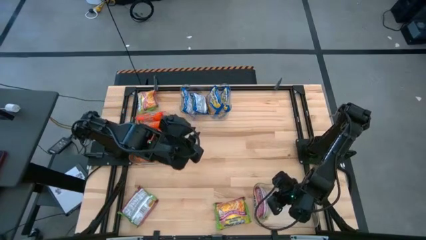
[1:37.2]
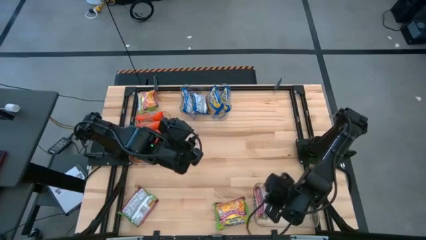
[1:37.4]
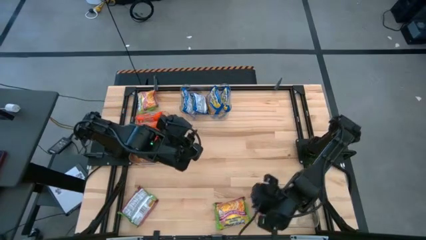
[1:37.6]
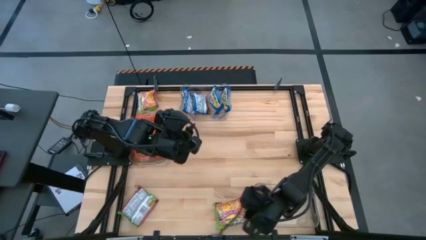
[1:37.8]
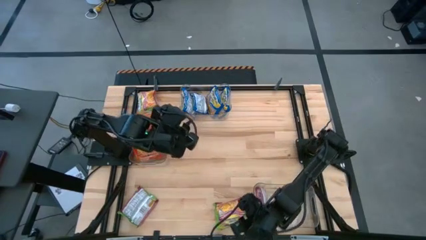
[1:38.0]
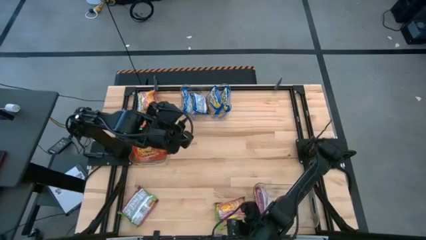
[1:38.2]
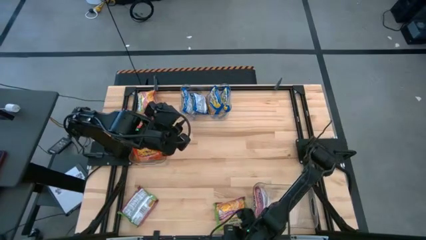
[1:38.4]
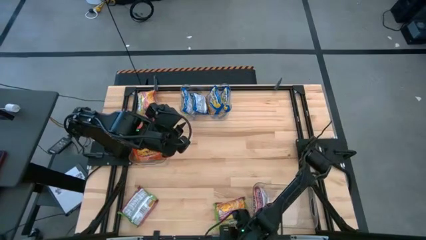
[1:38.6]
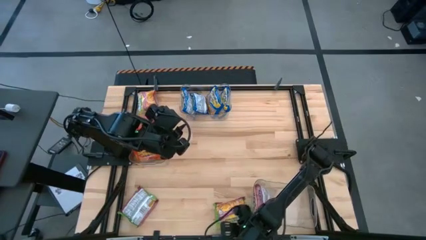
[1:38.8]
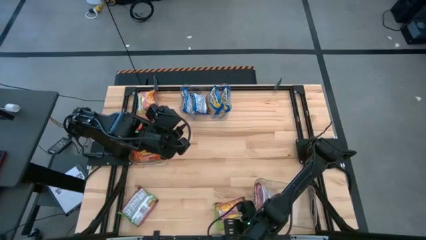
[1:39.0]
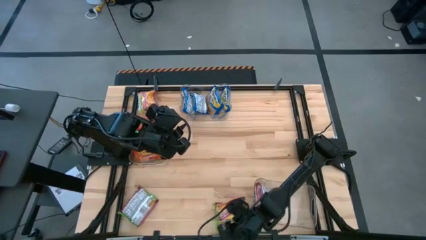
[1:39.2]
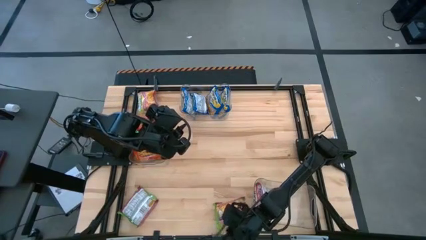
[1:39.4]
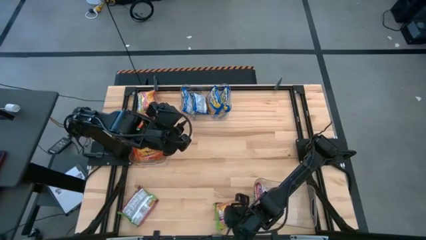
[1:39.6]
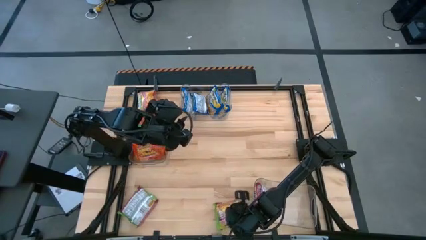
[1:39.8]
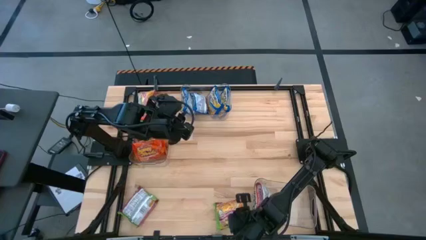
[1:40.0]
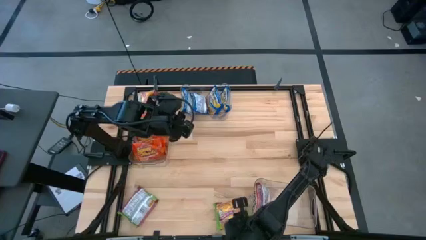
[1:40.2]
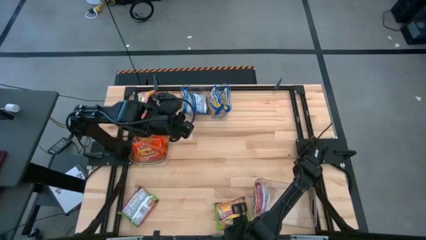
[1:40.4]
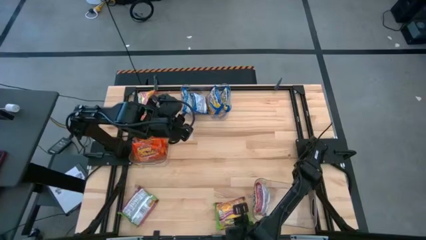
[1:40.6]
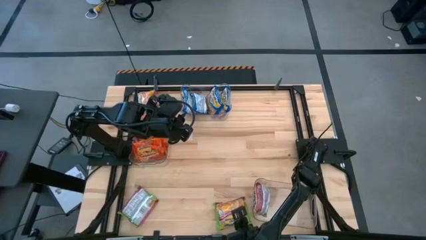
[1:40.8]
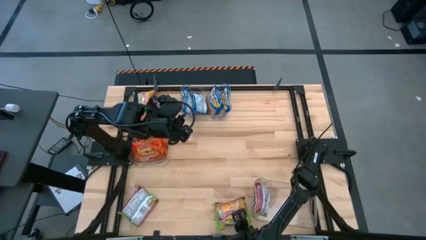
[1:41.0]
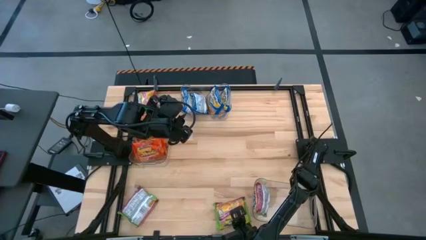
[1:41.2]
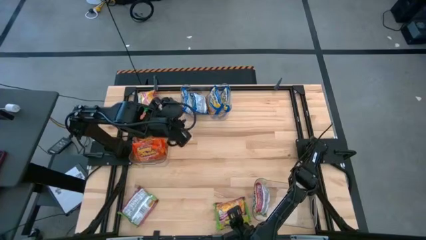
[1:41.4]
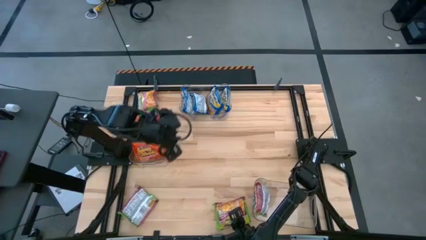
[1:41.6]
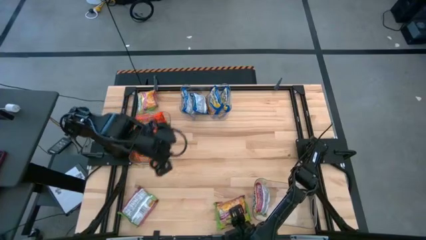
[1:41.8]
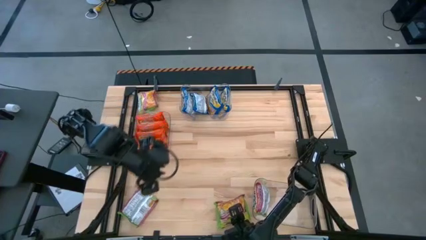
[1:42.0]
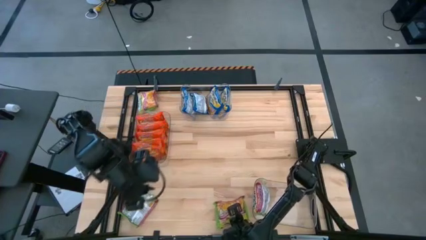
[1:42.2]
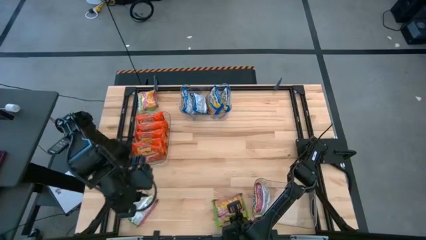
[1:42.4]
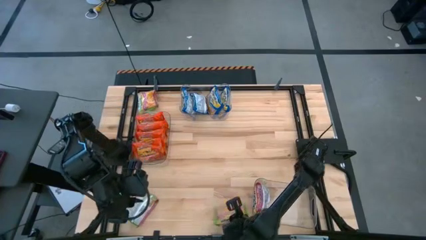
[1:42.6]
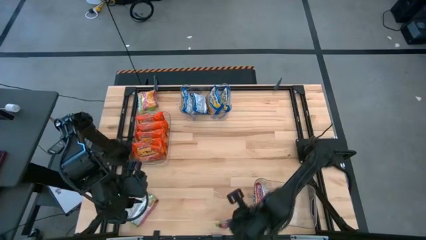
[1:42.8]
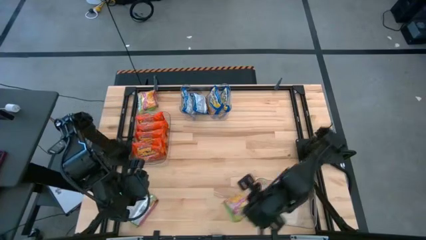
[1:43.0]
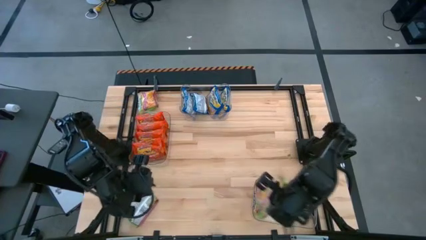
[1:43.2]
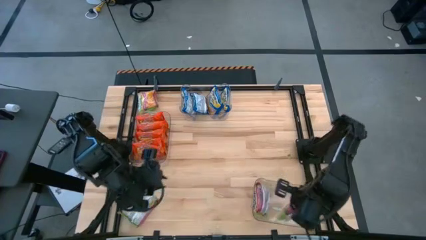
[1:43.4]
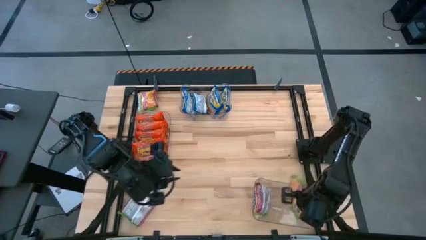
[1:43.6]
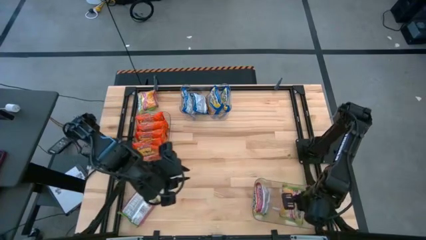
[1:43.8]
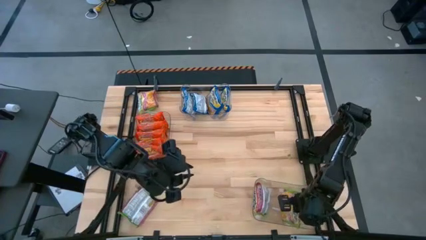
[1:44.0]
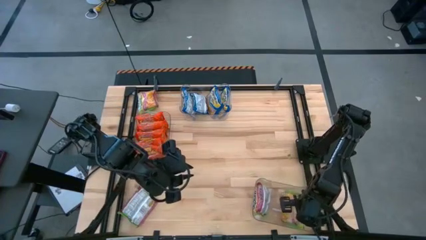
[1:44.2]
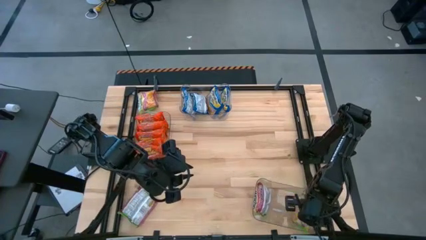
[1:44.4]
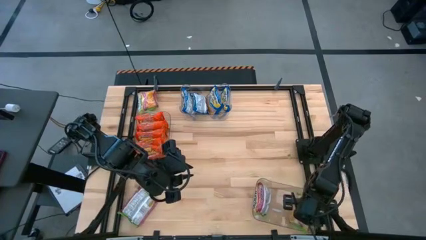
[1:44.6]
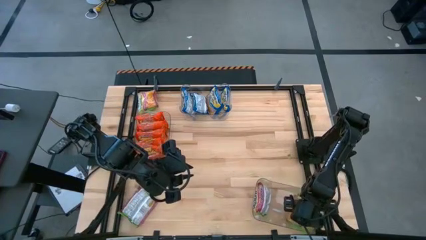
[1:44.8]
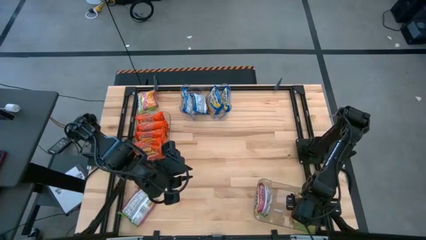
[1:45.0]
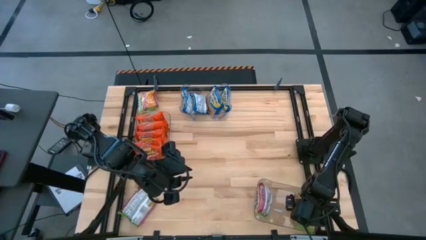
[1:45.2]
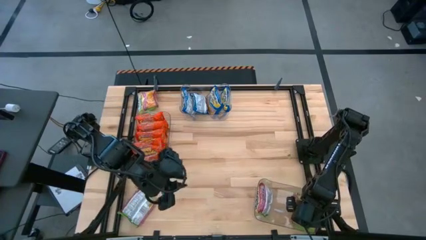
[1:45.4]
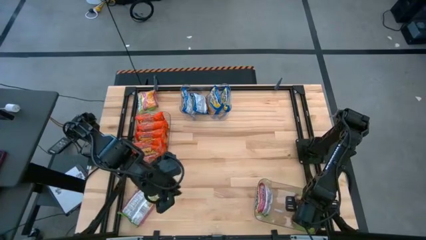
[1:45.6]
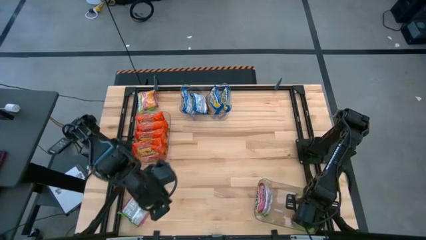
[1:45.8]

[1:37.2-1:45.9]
Task: Sort Maruchan noodles
Put the green noodles into the right transparent bin

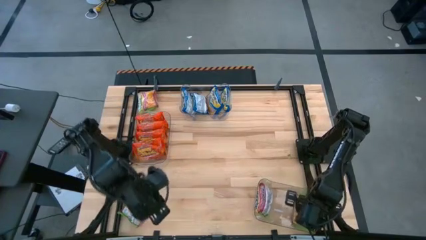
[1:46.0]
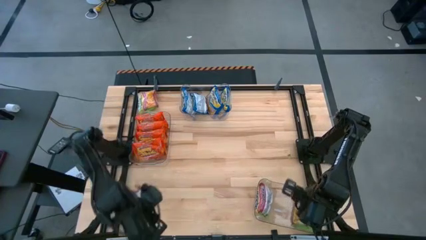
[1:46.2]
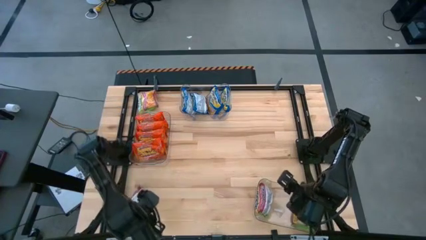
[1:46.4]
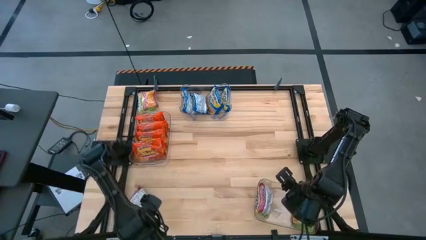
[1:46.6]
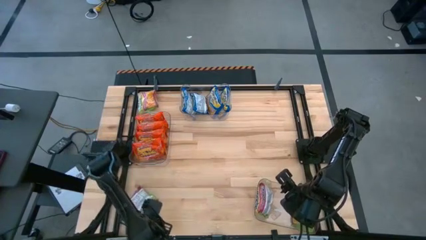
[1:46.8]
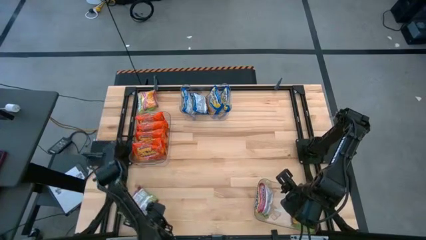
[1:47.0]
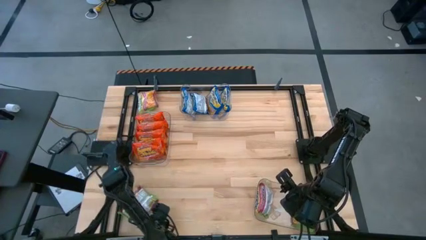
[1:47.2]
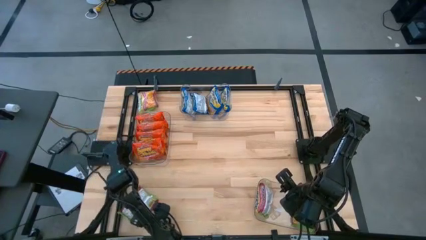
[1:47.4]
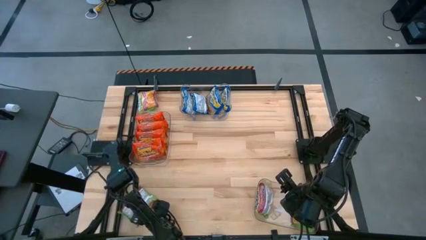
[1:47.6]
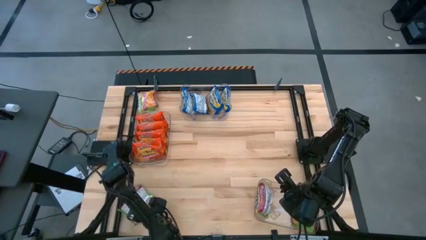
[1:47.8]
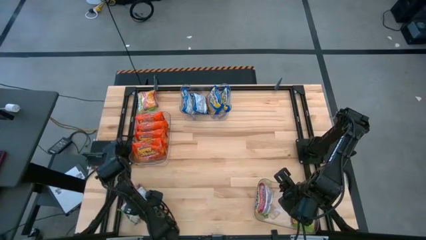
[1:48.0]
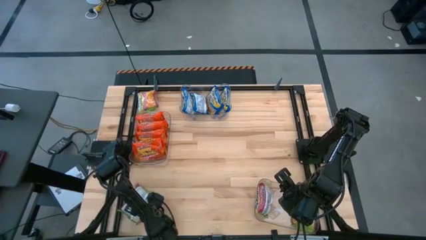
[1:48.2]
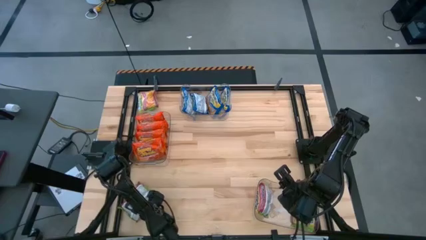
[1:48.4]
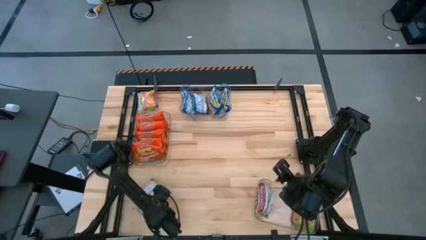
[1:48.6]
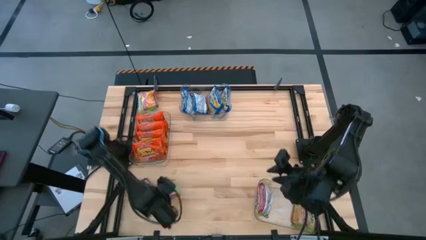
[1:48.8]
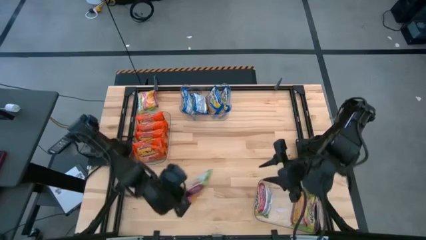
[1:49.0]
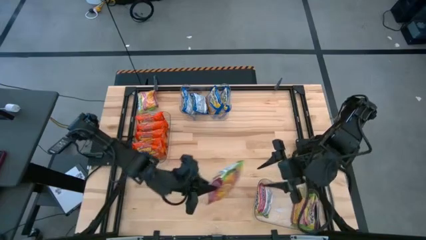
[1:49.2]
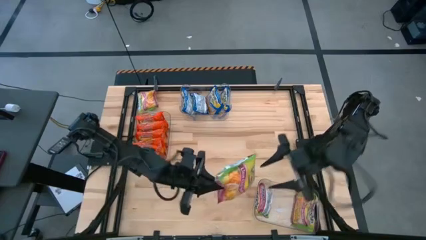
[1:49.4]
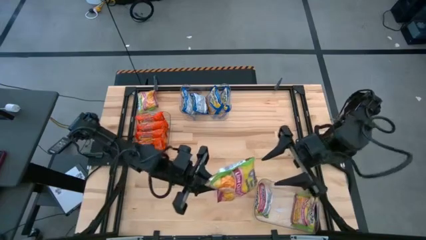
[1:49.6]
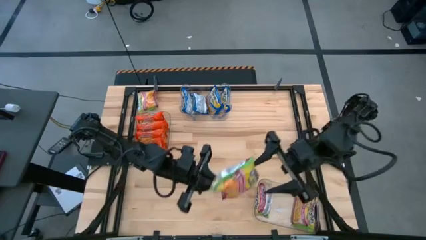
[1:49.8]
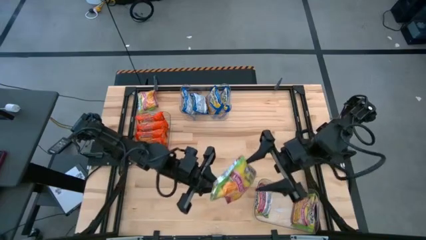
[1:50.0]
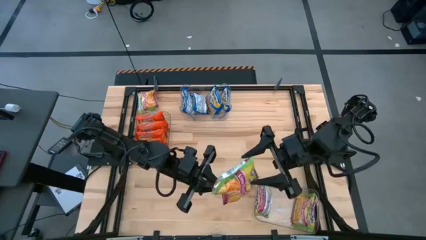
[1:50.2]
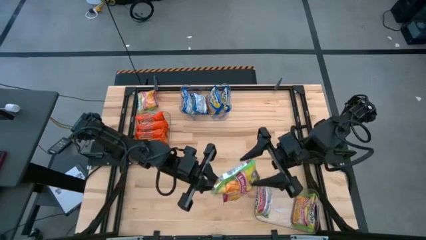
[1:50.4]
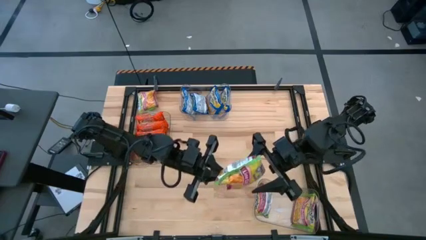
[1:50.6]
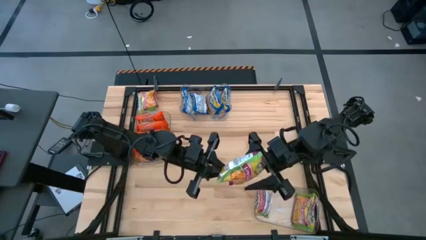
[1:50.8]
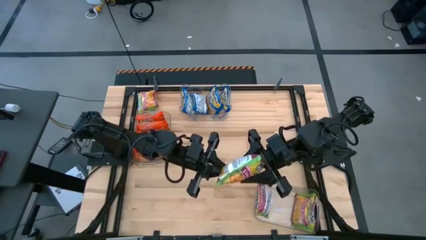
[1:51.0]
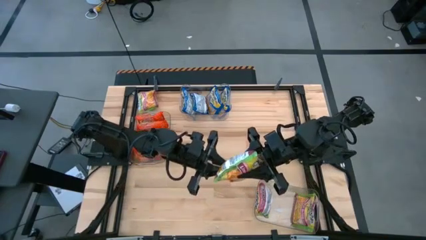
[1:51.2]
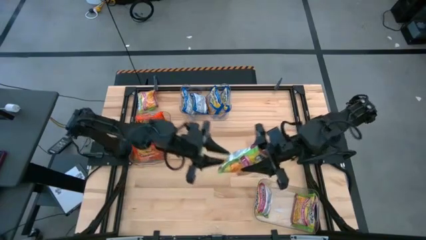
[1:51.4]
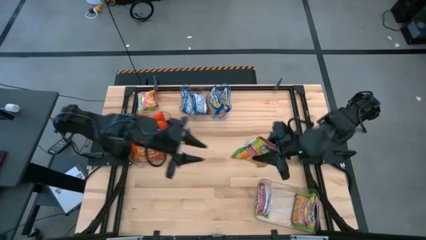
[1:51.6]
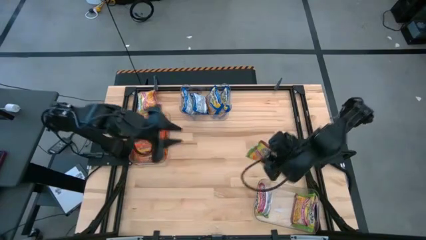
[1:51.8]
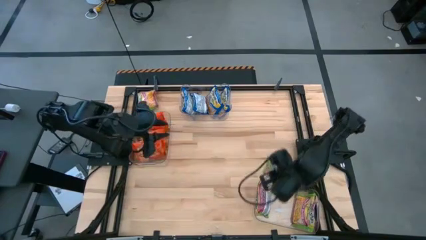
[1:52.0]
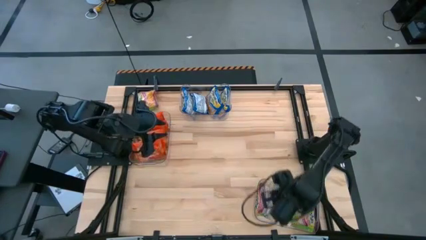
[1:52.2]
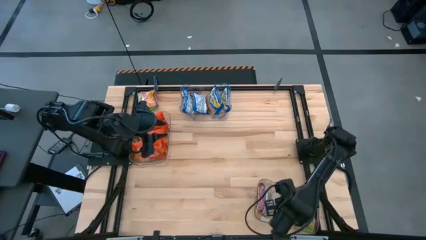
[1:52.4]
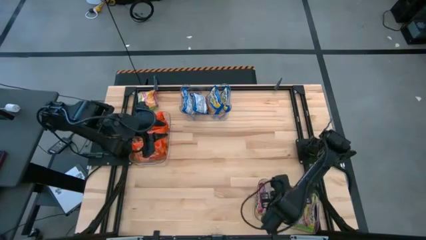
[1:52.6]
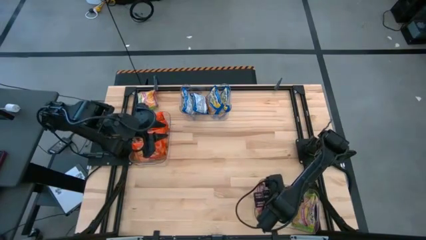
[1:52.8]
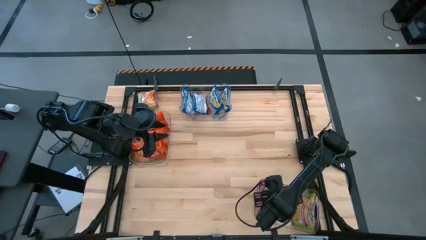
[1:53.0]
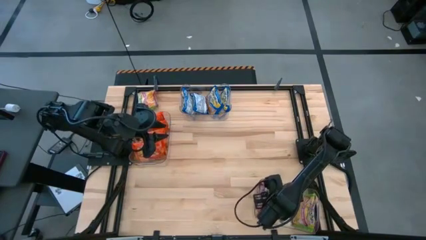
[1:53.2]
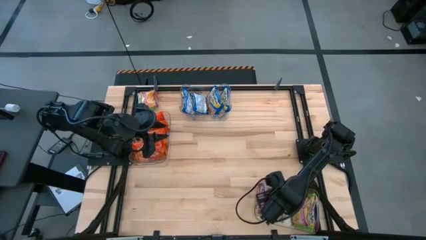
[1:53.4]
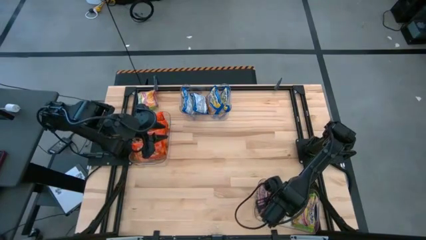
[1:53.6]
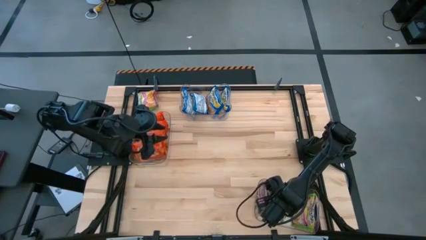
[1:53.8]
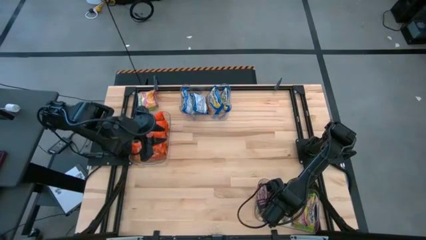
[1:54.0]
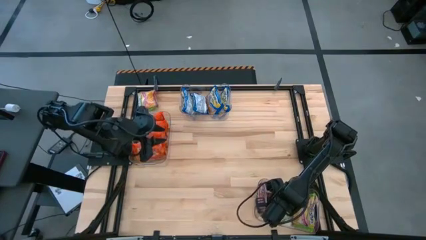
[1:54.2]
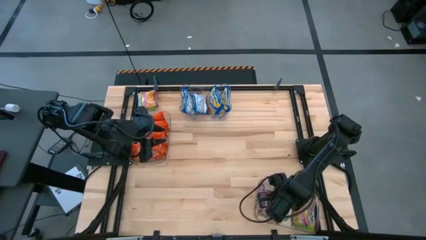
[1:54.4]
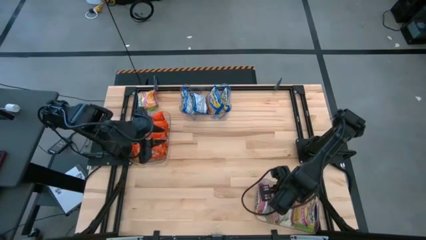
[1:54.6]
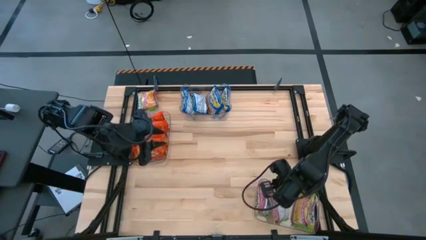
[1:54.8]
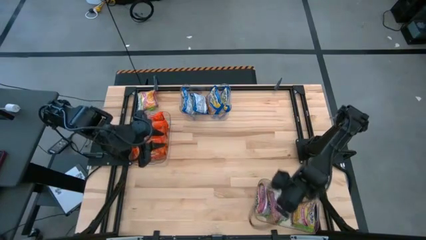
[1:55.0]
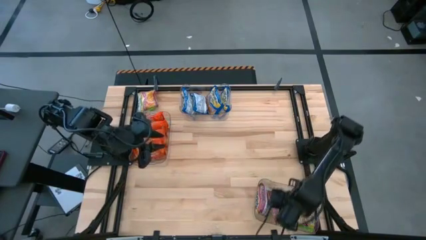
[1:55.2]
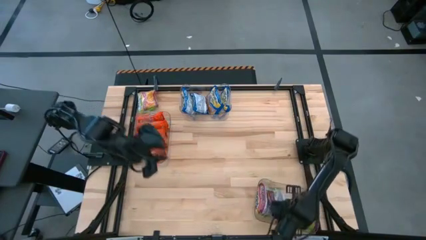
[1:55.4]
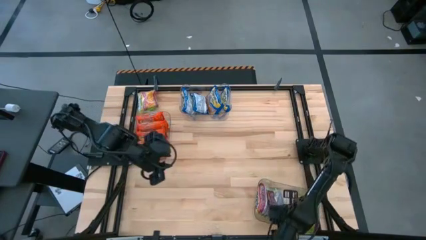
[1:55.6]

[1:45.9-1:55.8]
Put the green noodles into the right transparent bin
